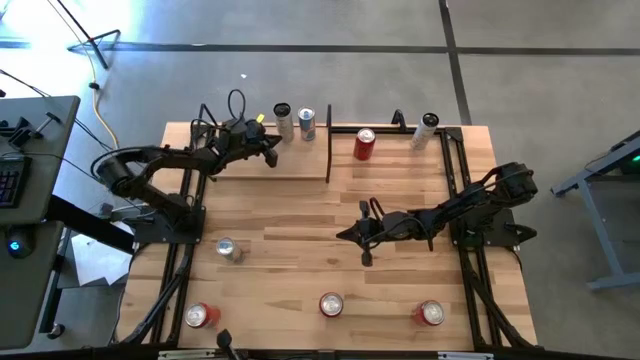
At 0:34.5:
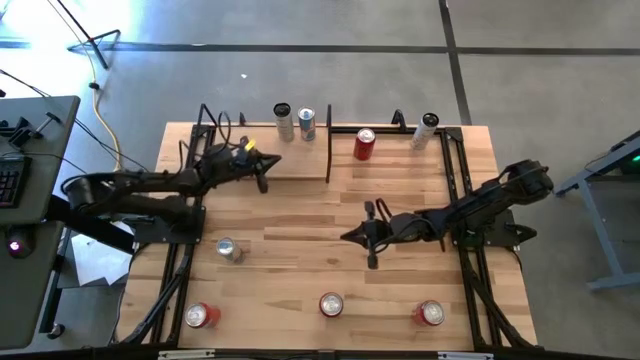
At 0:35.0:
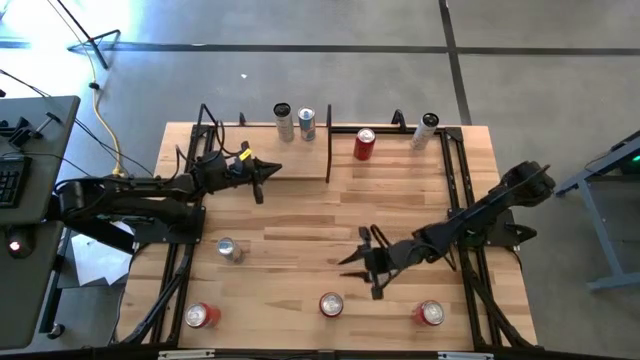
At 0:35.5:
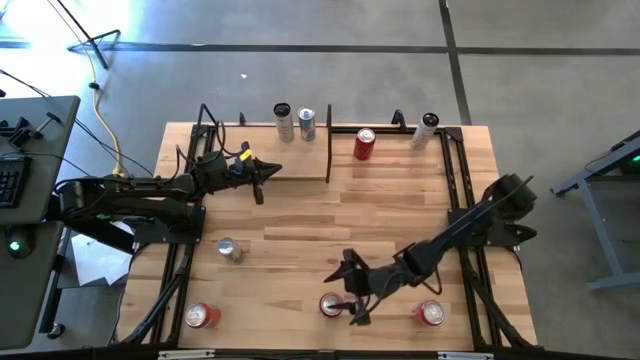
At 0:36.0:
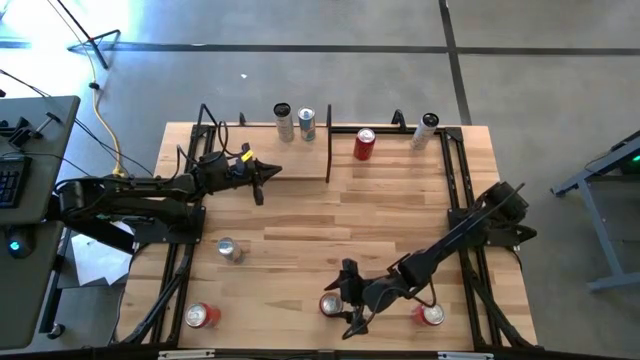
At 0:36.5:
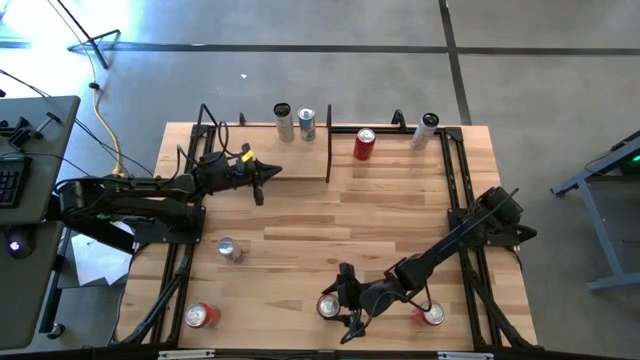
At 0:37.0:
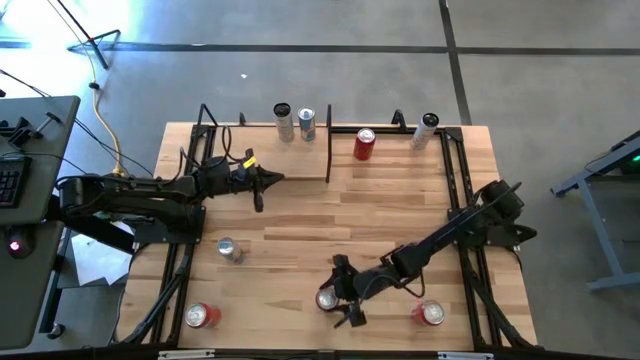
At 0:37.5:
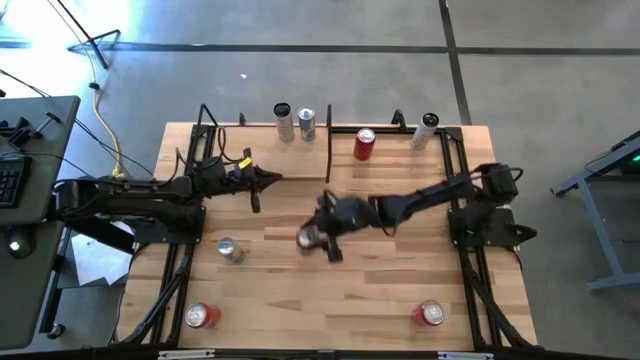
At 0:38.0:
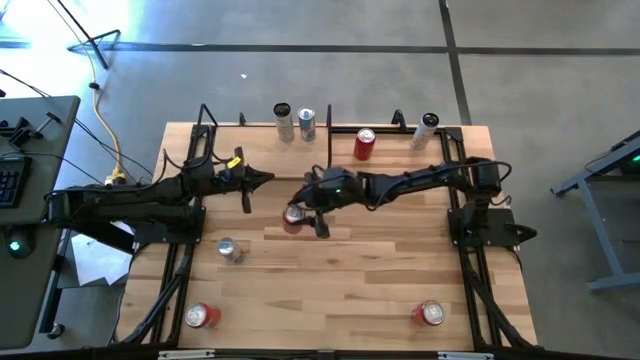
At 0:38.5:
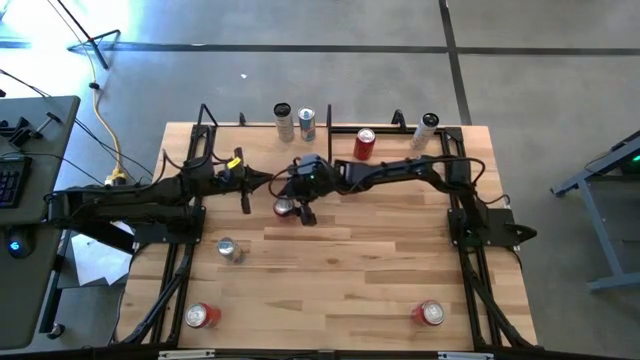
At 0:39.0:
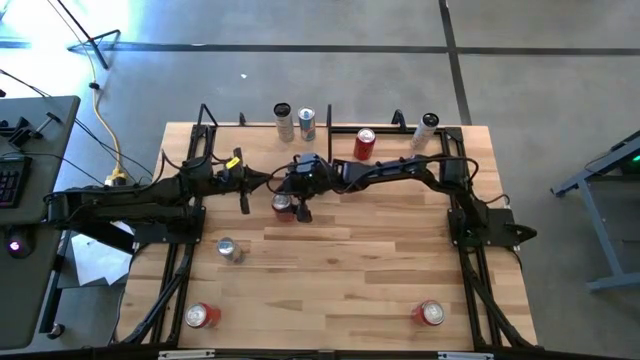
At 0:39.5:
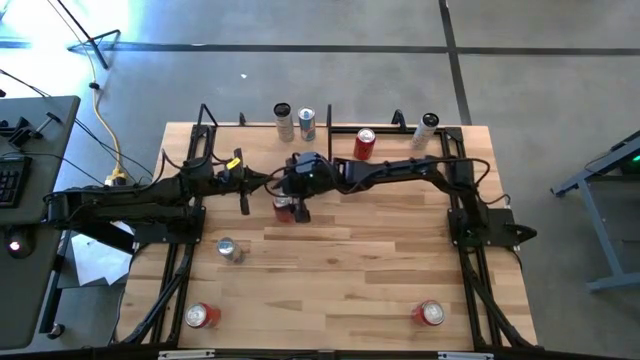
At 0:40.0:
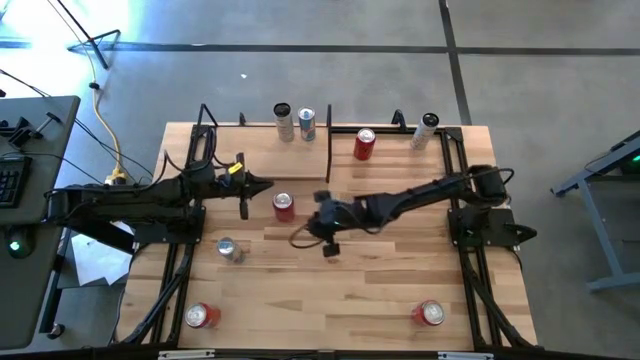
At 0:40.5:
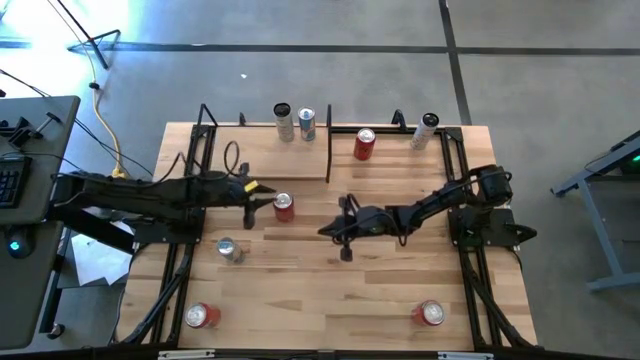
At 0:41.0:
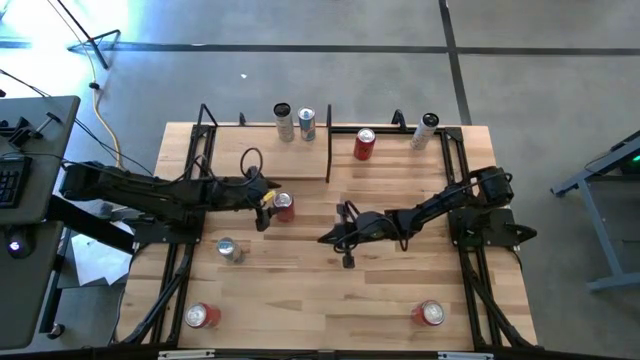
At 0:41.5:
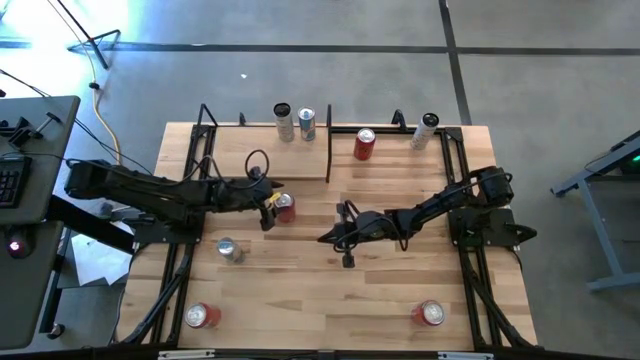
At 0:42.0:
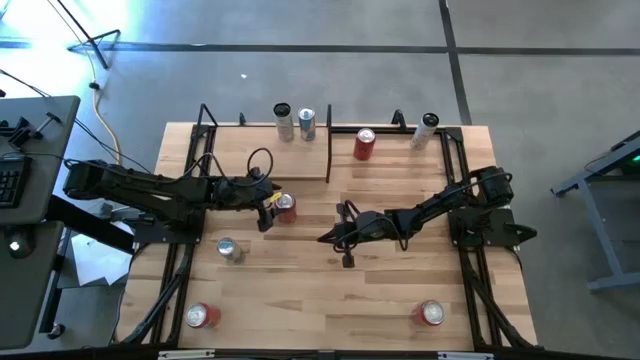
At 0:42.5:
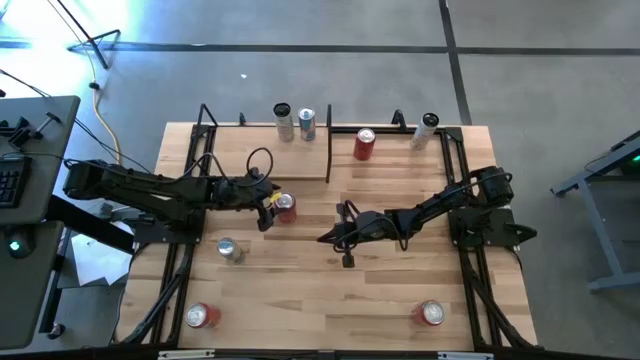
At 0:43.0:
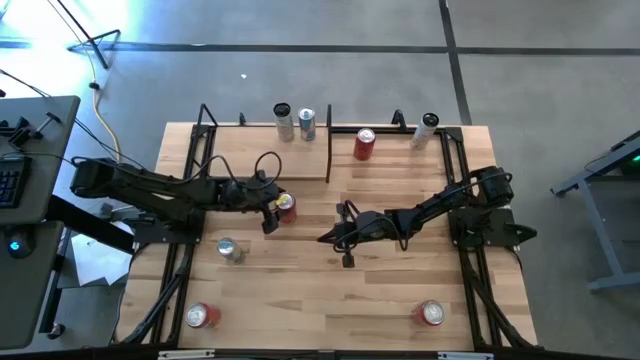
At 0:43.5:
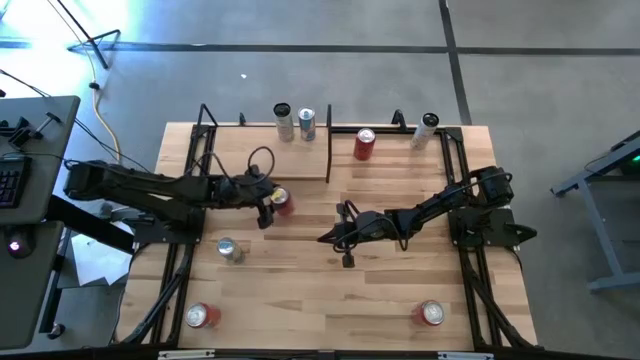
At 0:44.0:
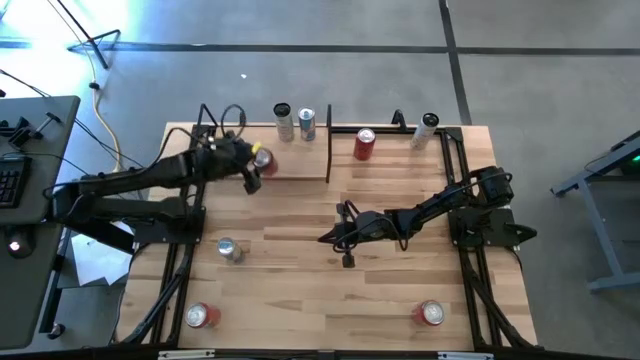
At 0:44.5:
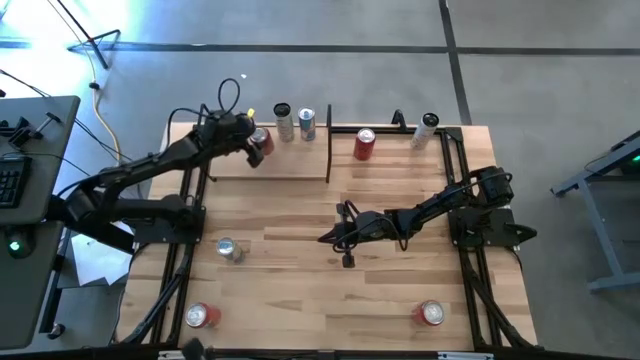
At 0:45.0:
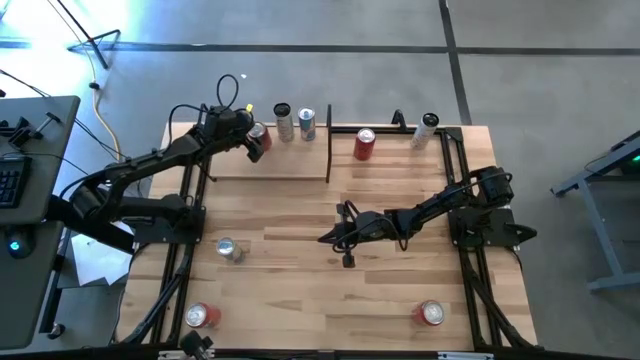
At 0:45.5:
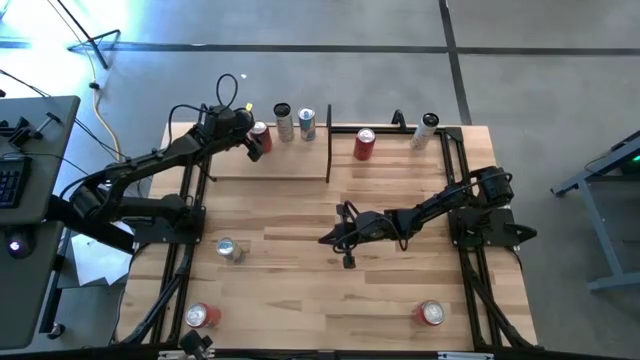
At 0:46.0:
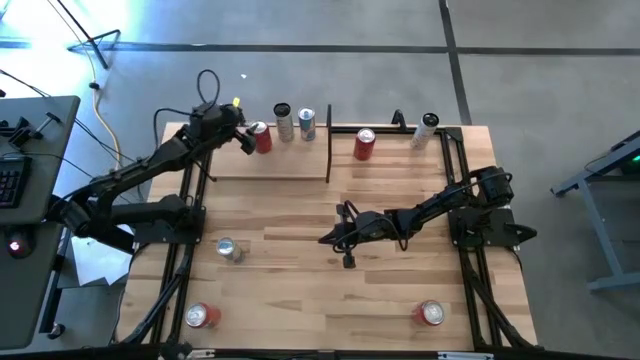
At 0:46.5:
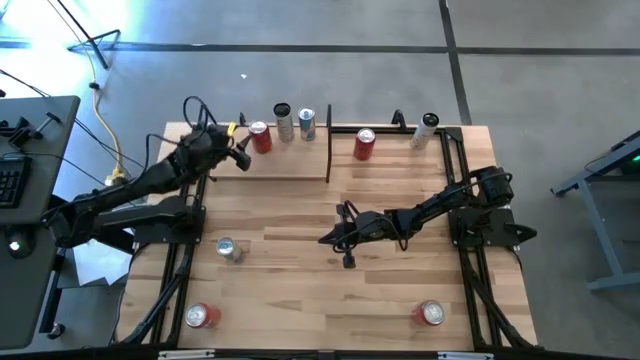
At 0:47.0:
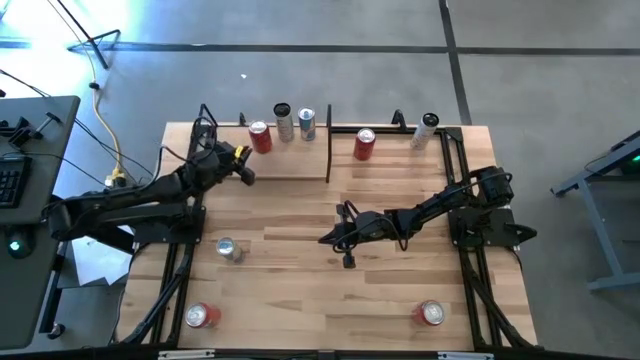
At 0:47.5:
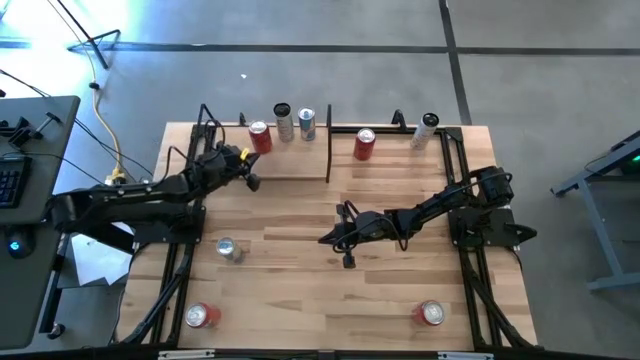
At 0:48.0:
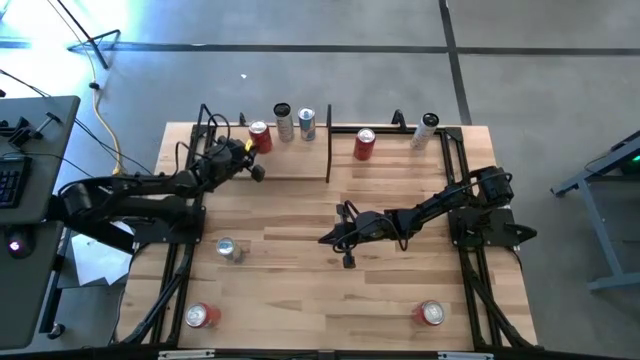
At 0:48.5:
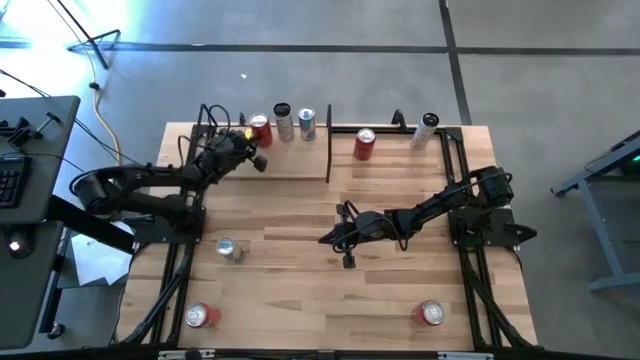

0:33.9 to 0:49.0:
Task: Place canned beverage on shelf
Put the bottom red-black soda can on the shelf
